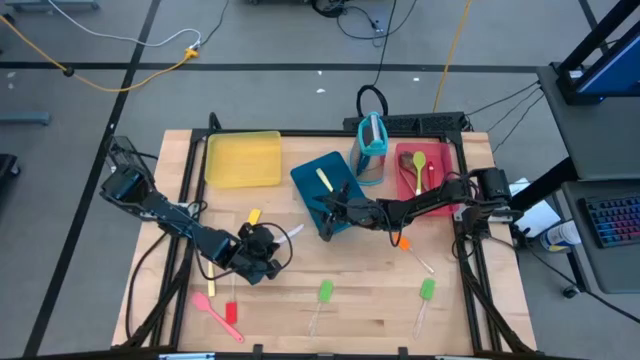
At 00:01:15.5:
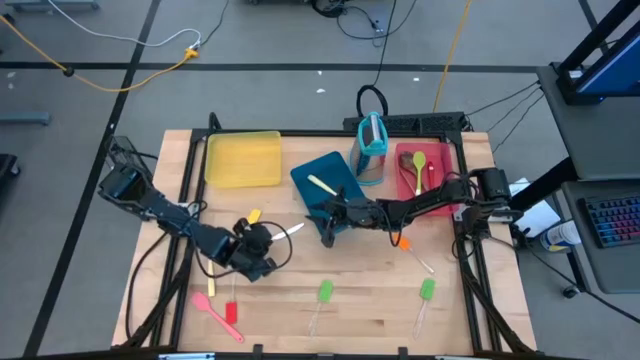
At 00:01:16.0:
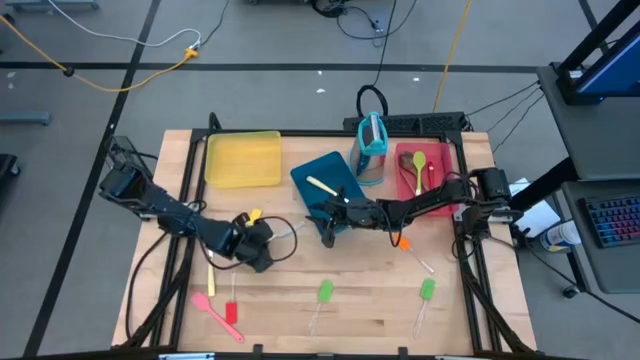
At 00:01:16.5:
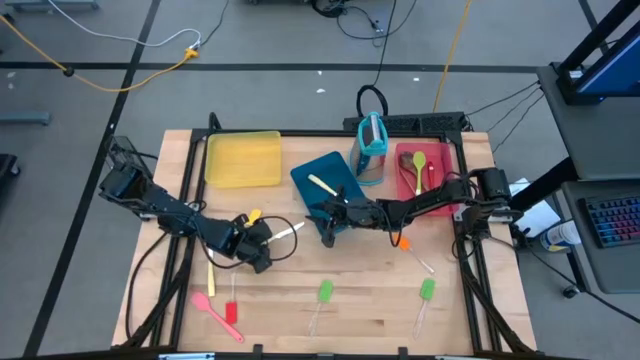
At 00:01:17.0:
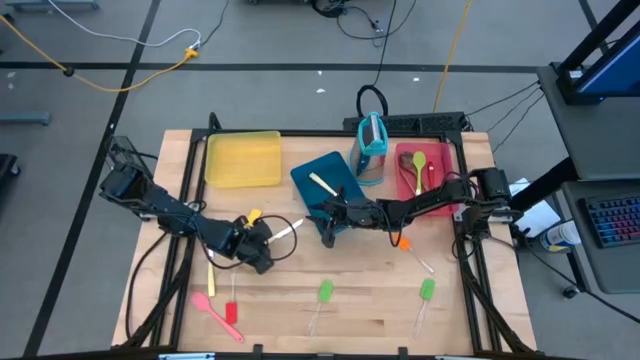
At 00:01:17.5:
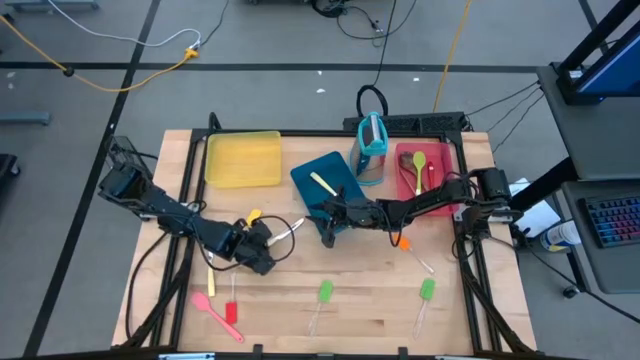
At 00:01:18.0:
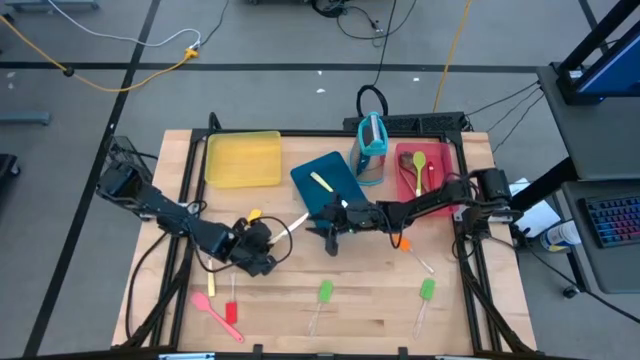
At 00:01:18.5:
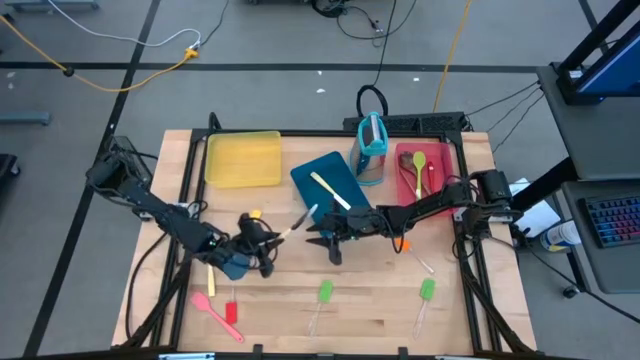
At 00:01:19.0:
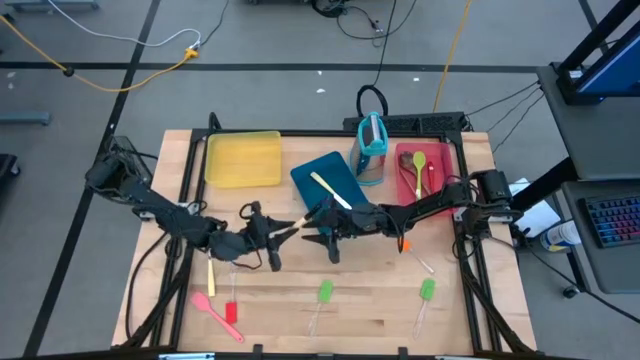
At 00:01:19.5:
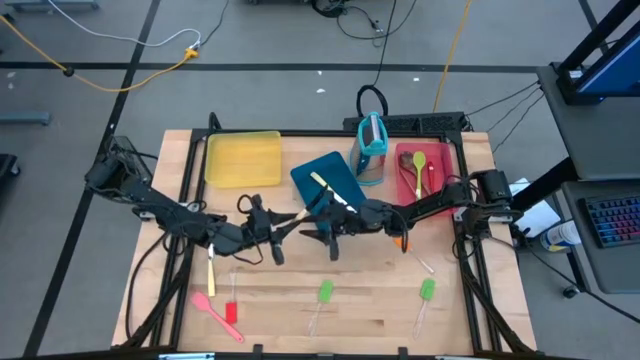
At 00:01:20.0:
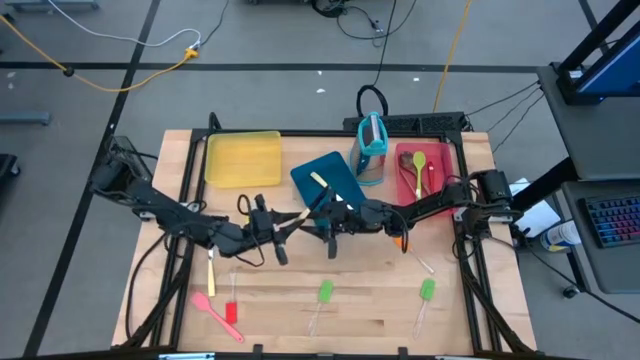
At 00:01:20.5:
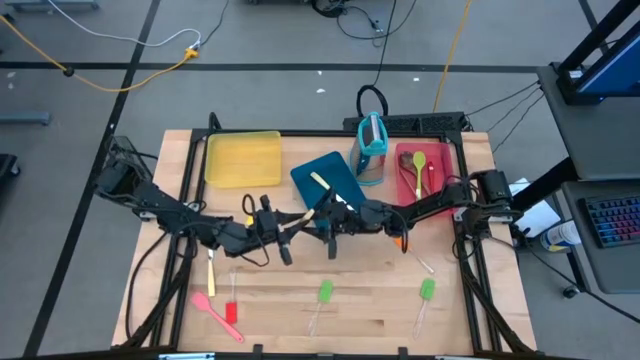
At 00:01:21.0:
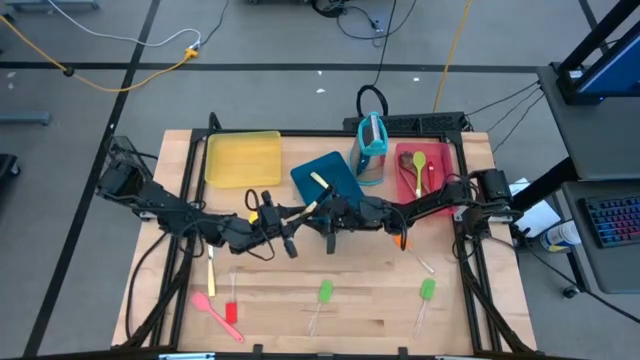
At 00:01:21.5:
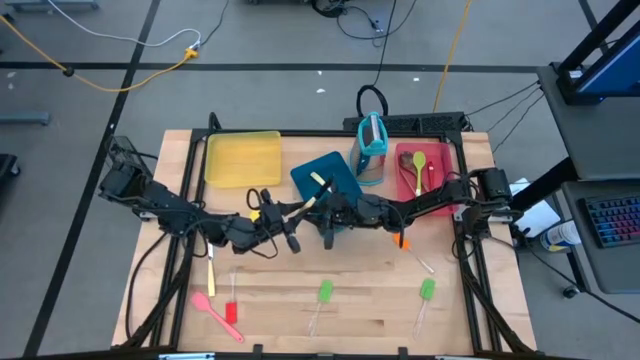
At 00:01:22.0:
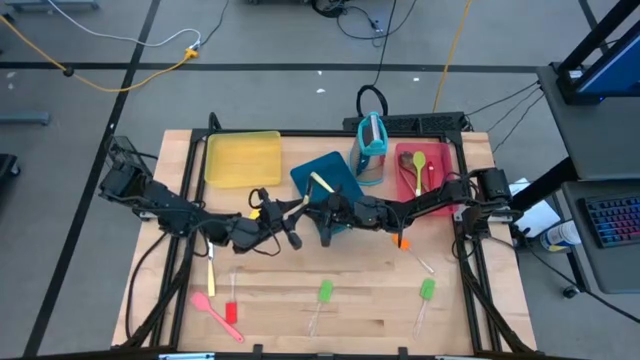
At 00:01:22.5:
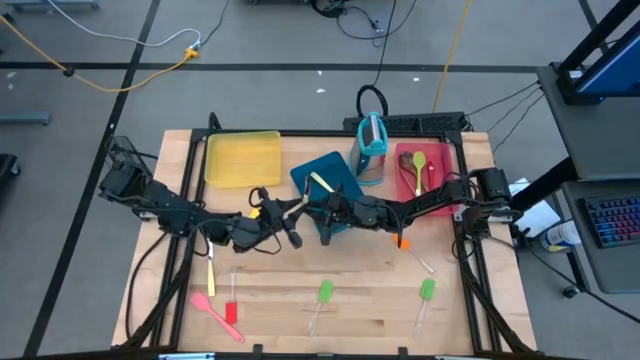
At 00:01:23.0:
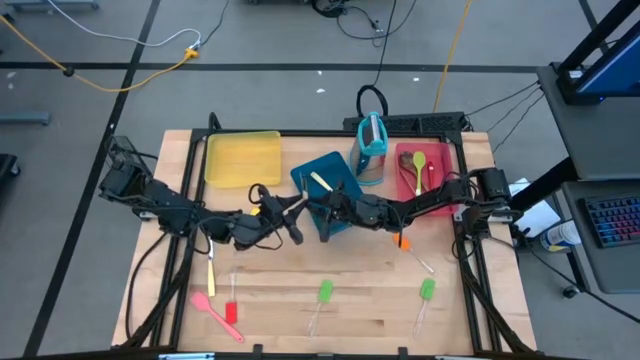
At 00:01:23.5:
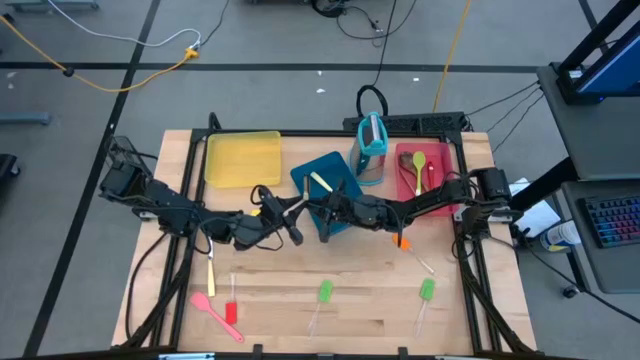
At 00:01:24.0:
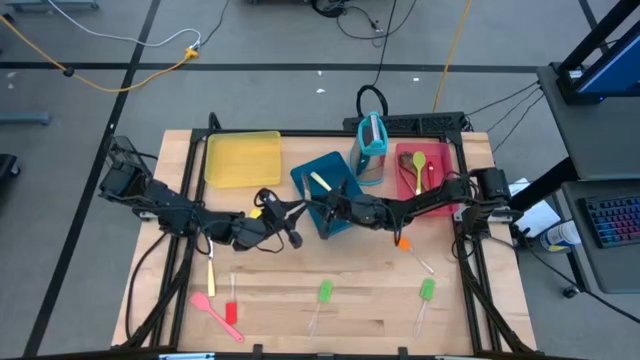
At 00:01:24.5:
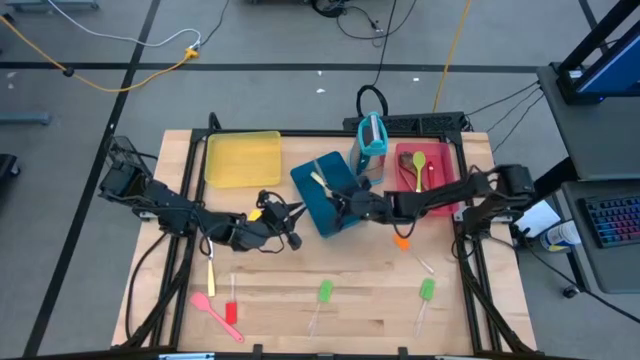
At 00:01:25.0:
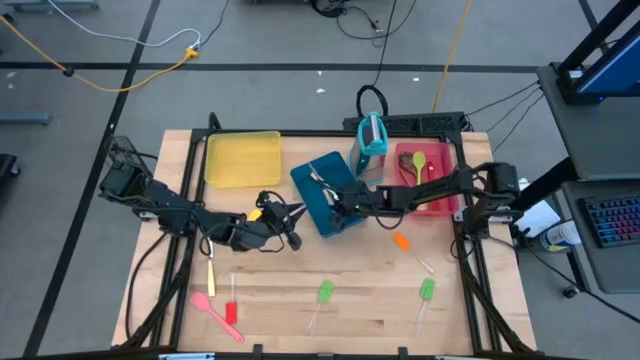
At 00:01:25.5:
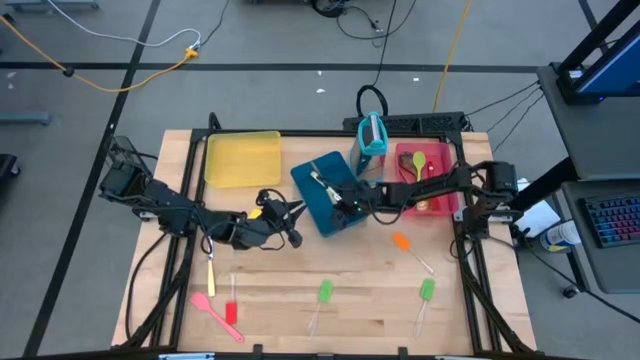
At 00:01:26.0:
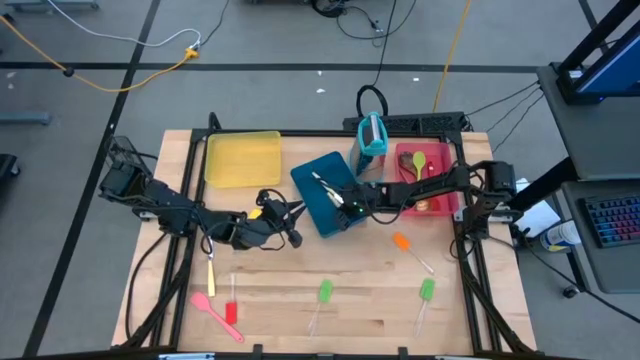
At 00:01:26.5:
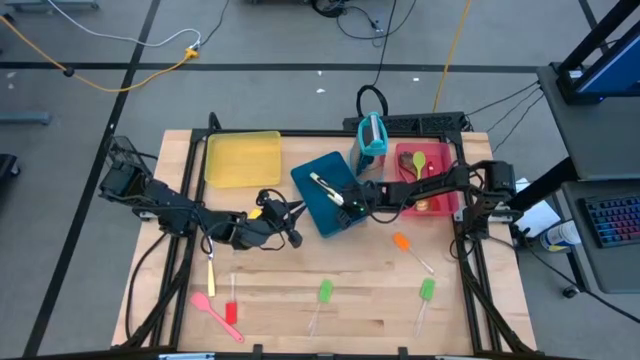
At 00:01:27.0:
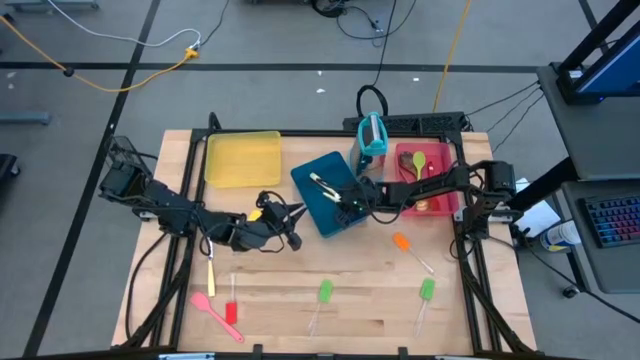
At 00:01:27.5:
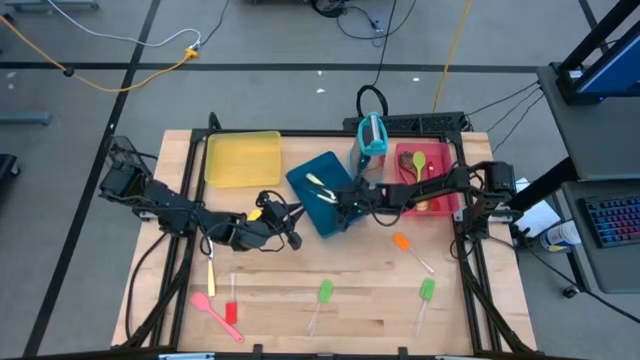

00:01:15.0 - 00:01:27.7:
Task: Pick & Place Kitchen Items
Put the yellow knife into the blue bin

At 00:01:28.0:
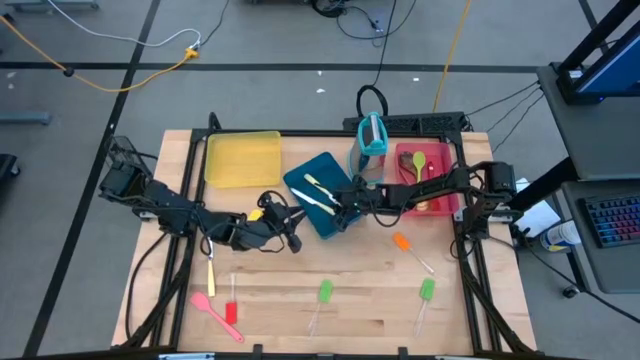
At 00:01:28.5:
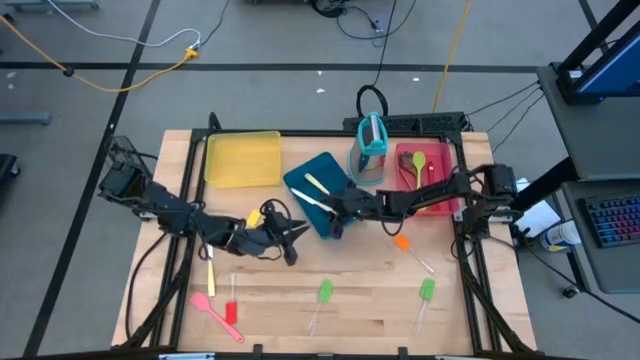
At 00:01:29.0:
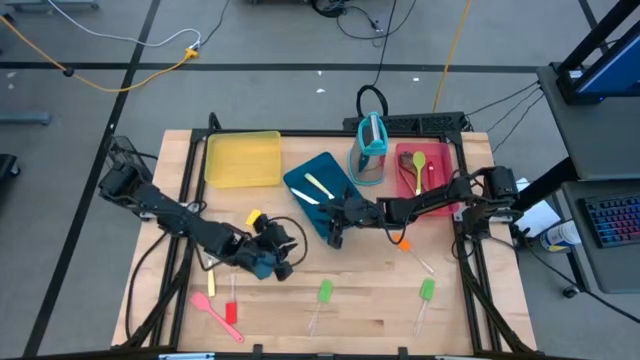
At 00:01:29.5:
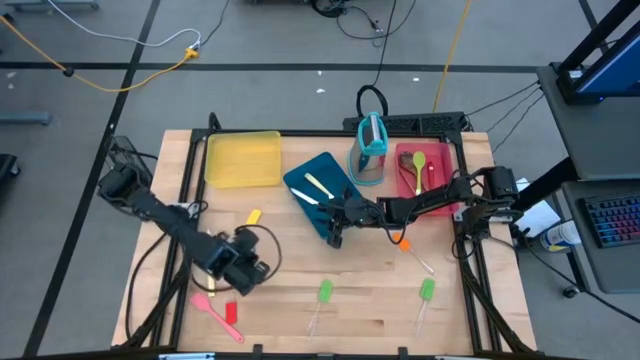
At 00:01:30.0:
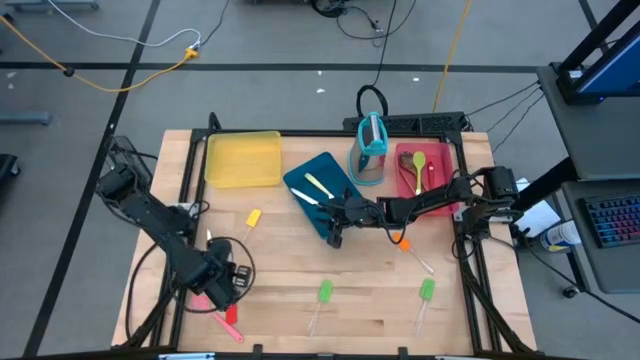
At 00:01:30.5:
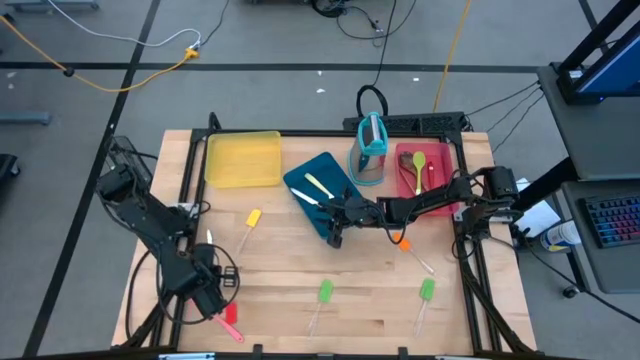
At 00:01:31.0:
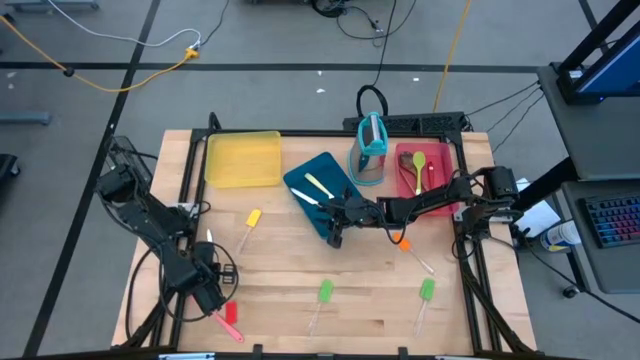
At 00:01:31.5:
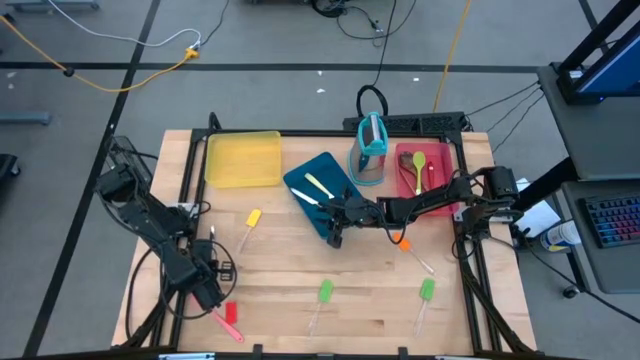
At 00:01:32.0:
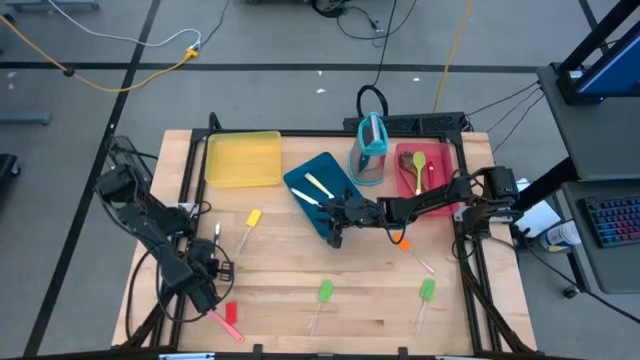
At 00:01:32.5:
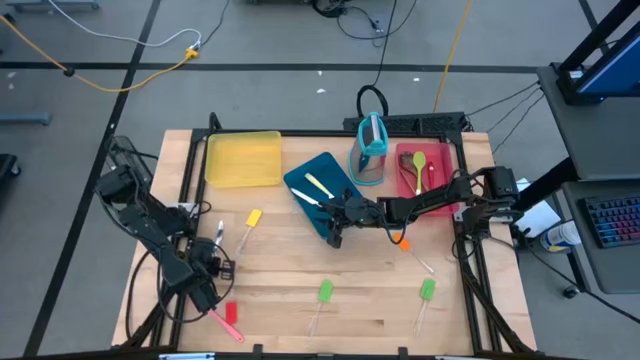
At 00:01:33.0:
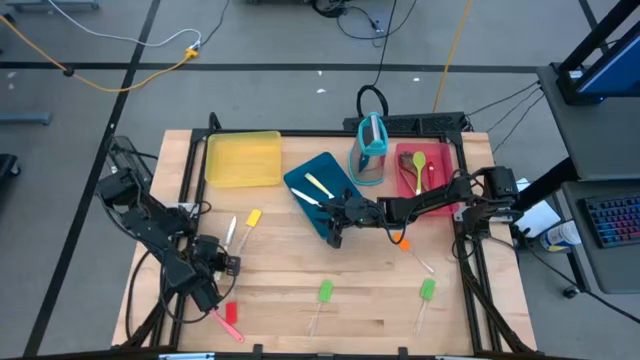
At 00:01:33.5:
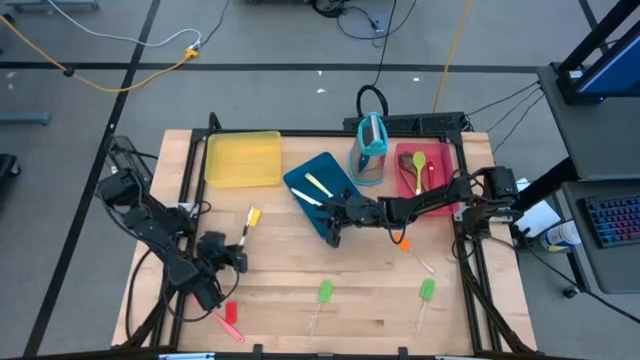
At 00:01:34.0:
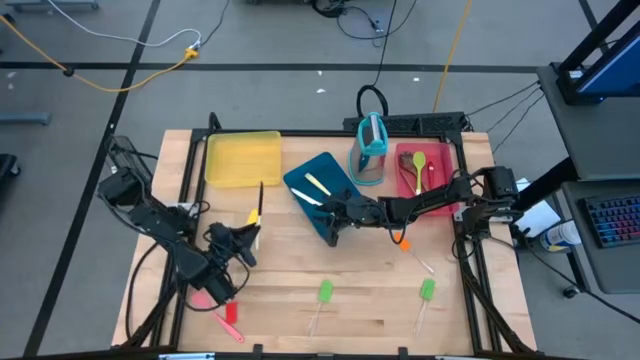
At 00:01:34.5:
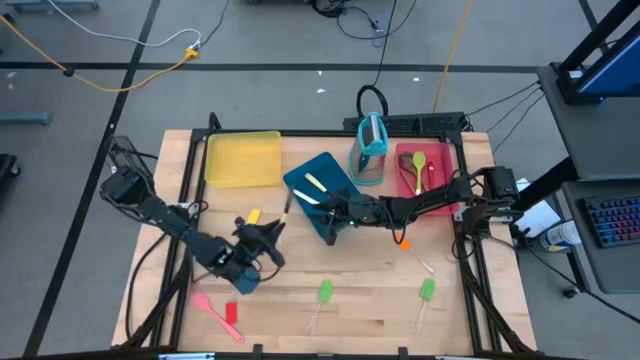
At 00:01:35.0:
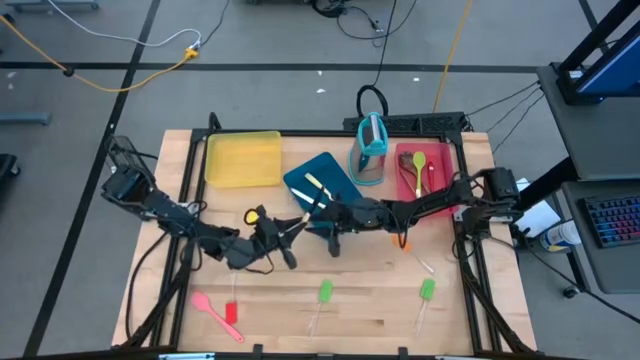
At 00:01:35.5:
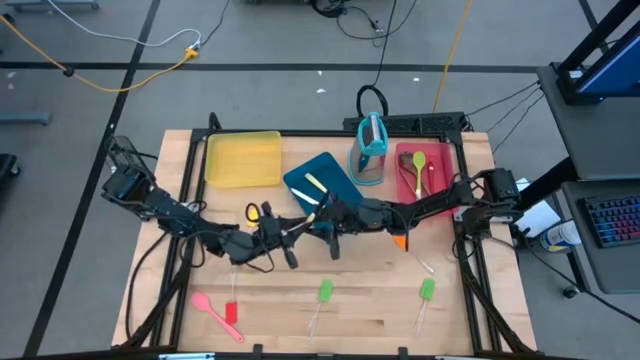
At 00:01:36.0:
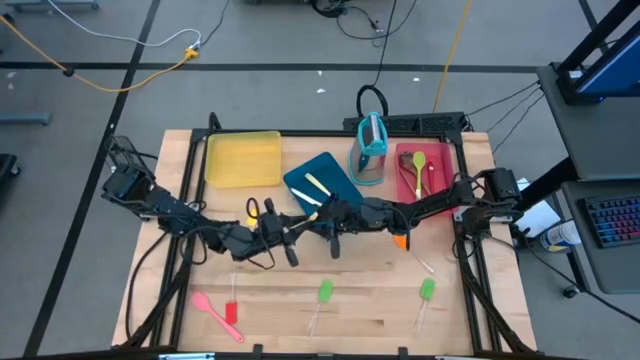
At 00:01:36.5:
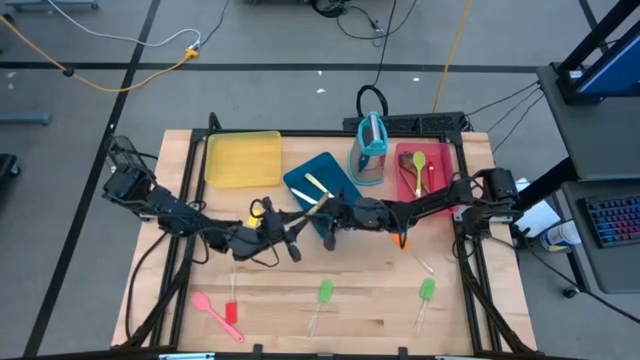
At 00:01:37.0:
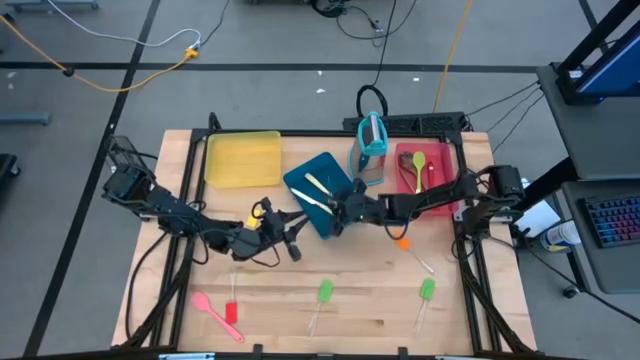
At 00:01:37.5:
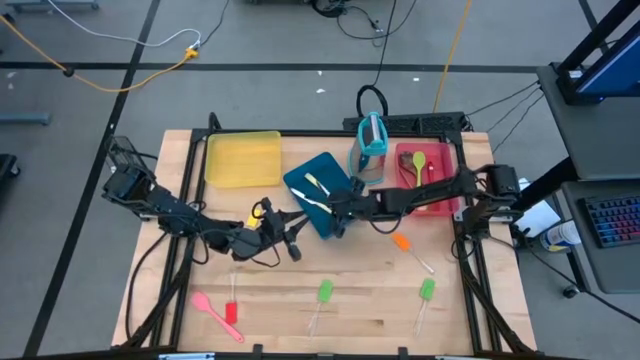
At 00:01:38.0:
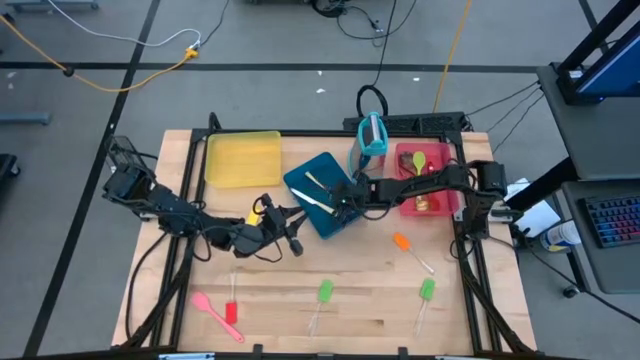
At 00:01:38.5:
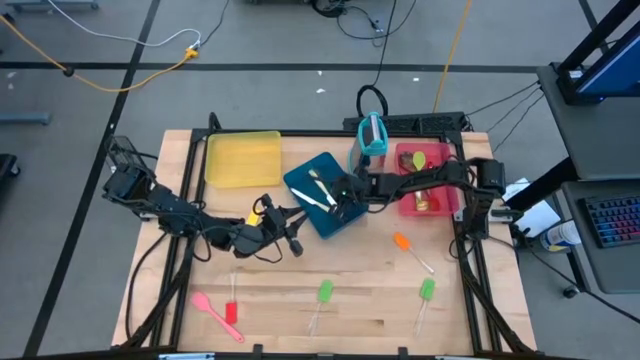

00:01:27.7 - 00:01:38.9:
Put the yellow knife into the blue bin
